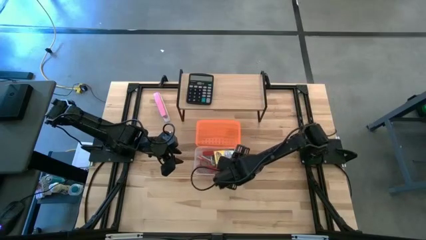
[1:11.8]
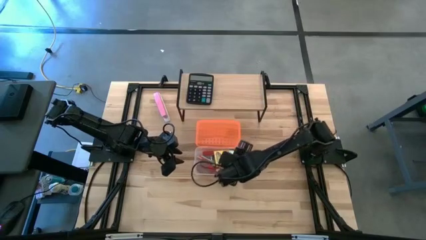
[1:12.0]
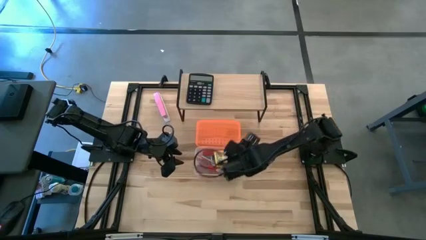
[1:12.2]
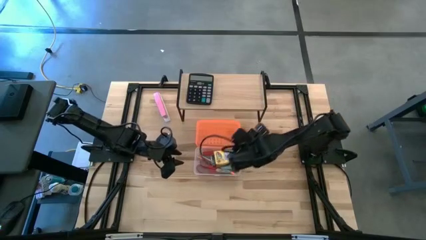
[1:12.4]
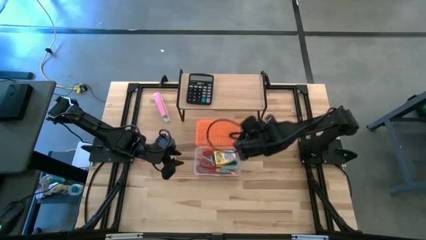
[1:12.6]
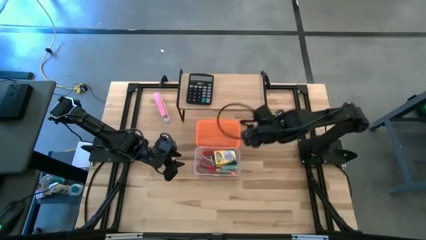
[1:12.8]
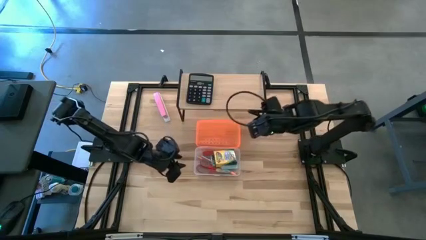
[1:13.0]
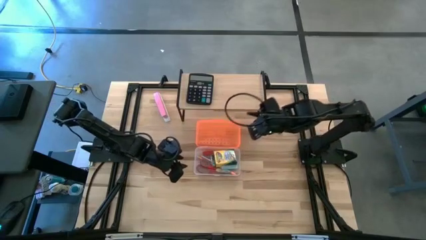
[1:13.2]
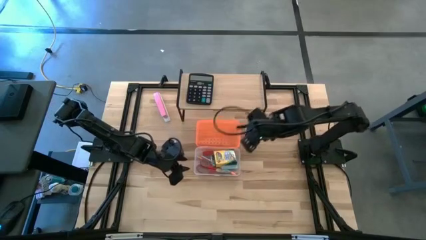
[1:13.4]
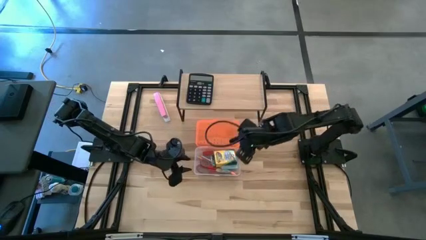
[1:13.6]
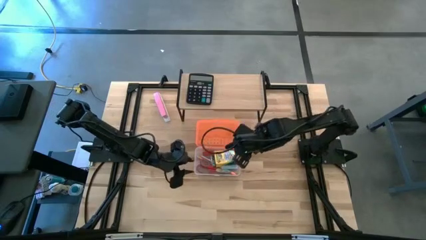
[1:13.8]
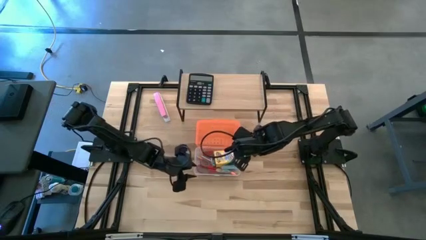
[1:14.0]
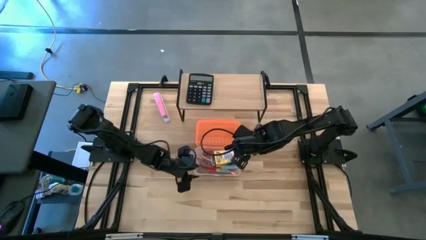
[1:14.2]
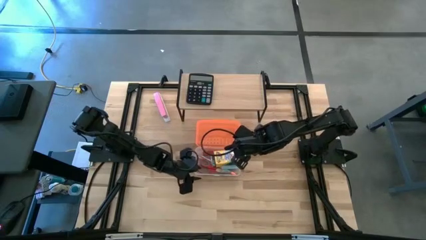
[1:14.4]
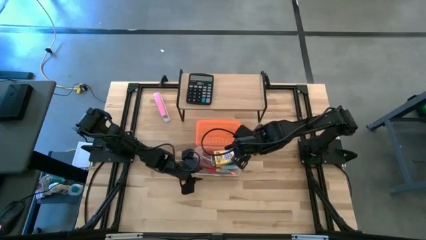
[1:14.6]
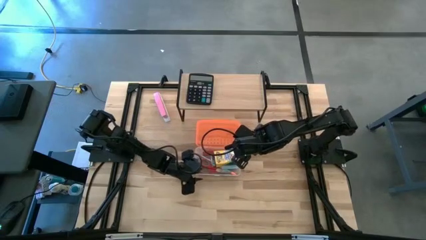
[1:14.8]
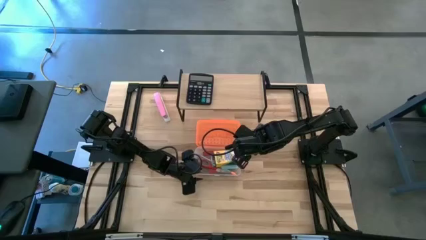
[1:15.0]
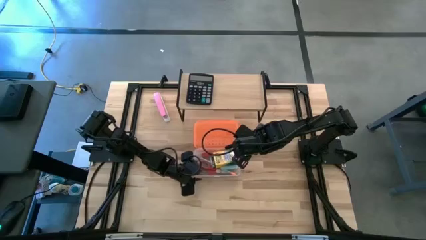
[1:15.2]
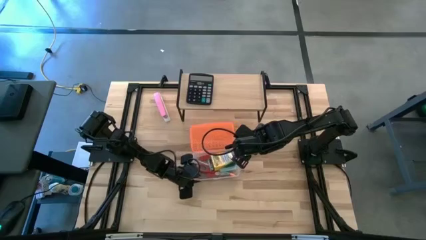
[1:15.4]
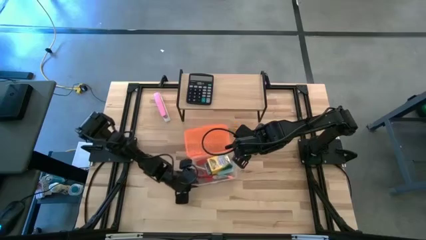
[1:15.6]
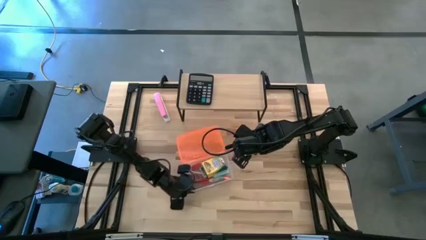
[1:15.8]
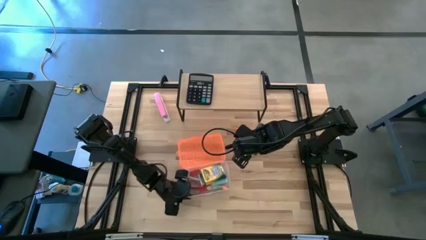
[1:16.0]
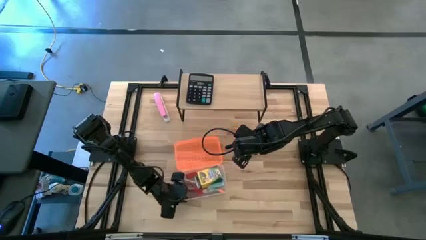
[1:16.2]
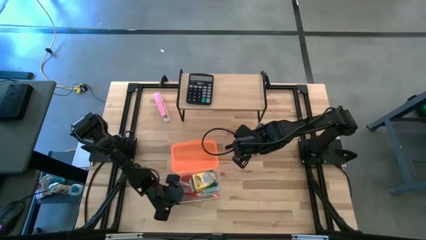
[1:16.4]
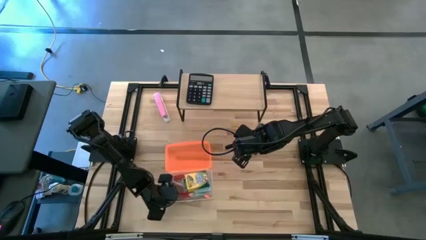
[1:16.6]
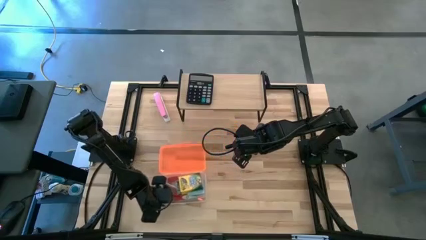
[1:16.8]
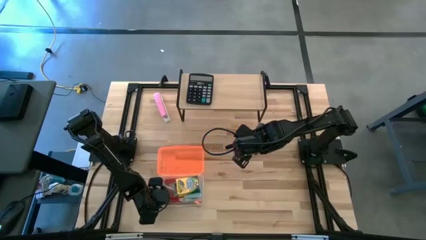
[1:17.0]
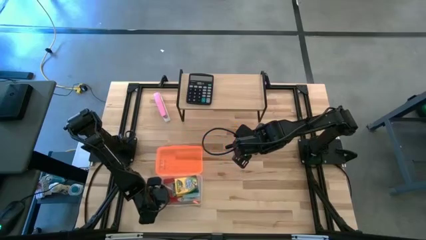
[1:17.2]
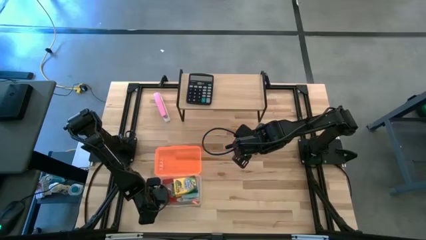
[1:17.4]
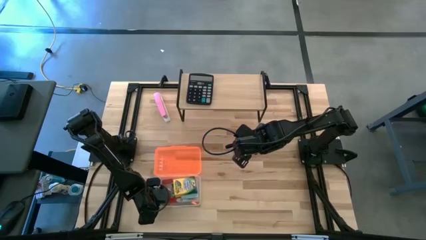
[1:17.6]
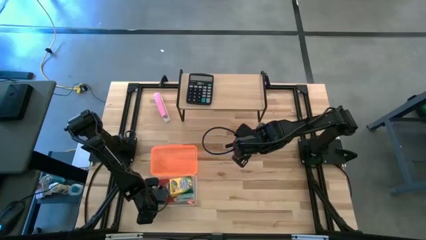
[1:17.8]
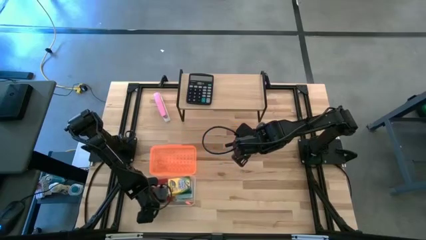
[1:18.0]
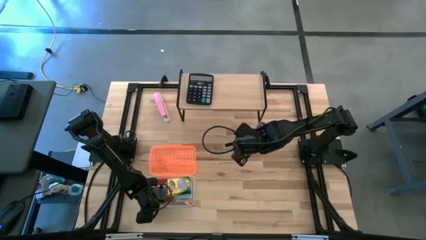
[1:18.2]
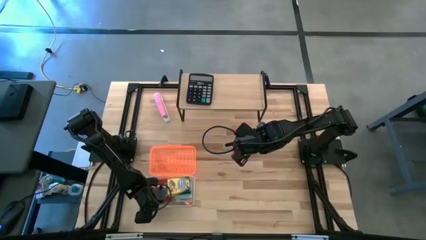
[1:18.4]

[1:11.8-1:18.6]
Task: Pack school essentials
Move the supply box to the bottom left of the table

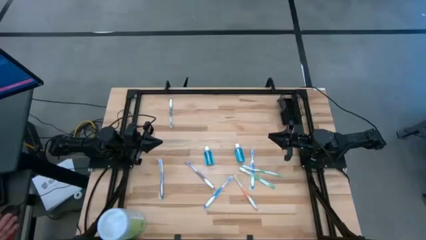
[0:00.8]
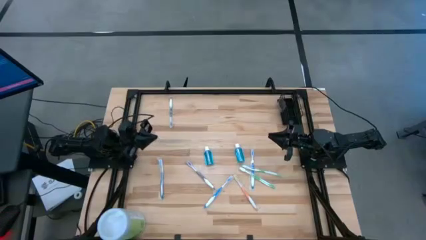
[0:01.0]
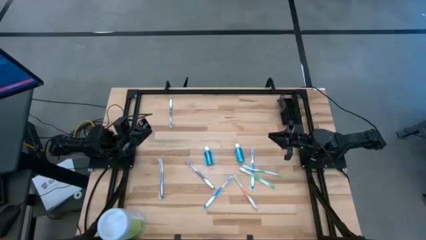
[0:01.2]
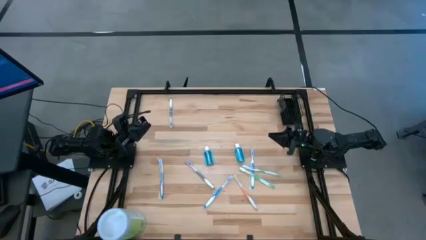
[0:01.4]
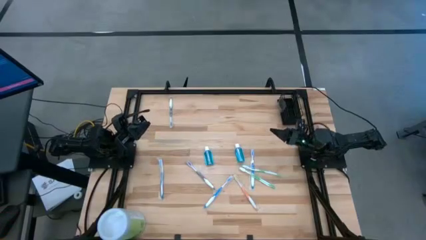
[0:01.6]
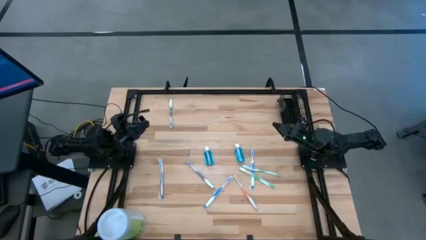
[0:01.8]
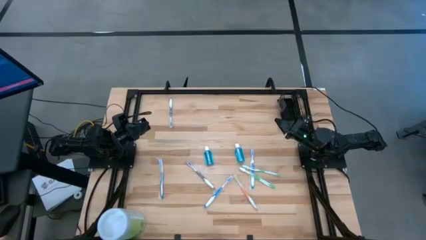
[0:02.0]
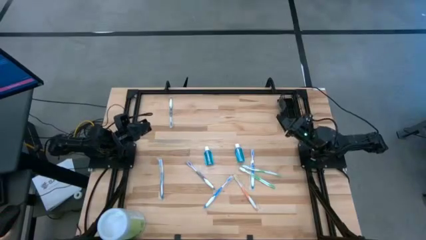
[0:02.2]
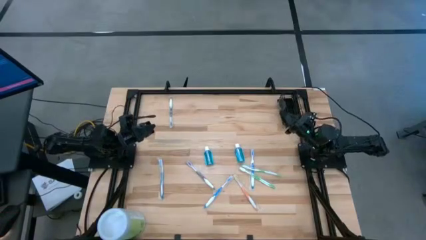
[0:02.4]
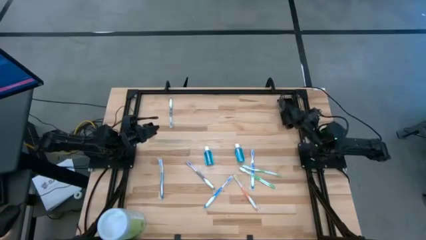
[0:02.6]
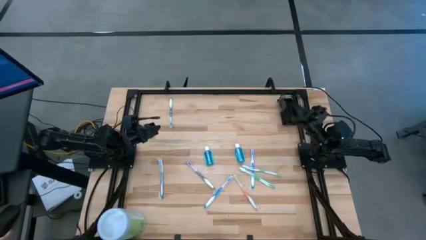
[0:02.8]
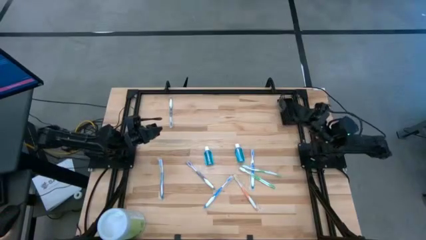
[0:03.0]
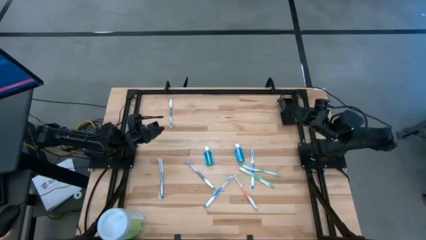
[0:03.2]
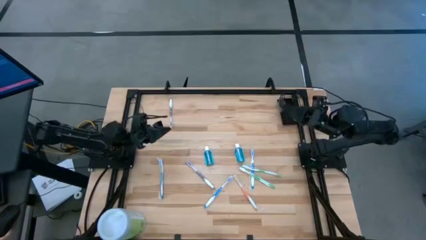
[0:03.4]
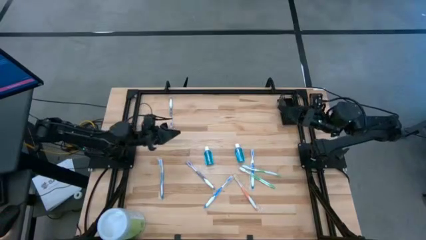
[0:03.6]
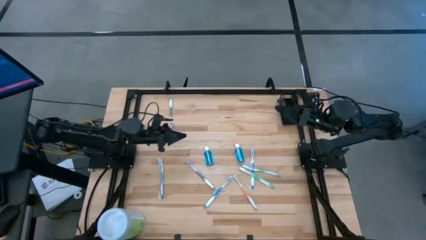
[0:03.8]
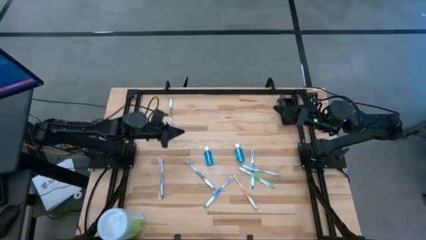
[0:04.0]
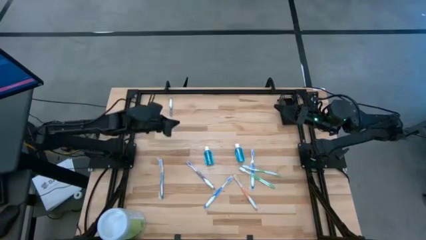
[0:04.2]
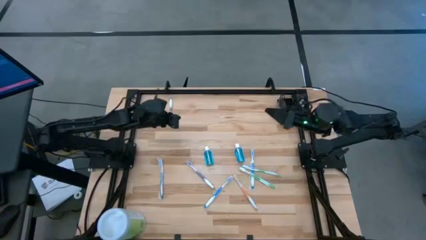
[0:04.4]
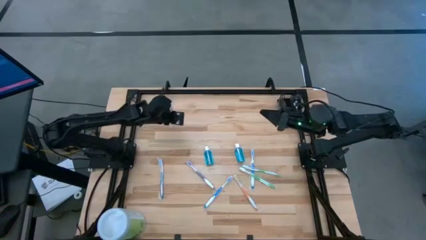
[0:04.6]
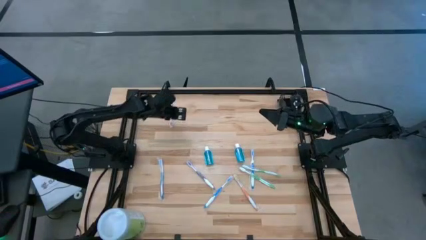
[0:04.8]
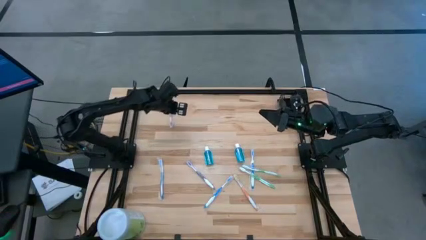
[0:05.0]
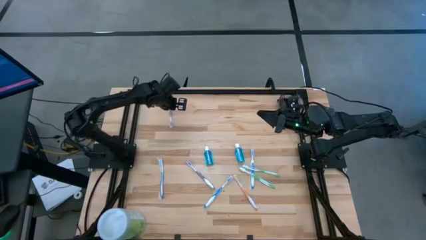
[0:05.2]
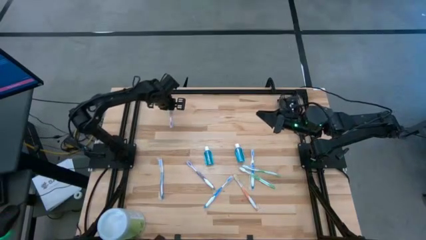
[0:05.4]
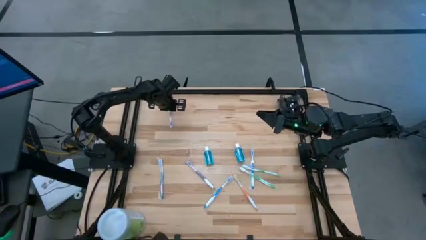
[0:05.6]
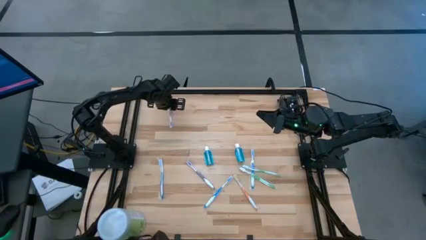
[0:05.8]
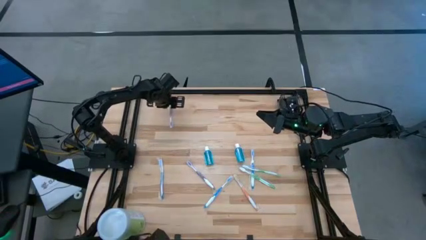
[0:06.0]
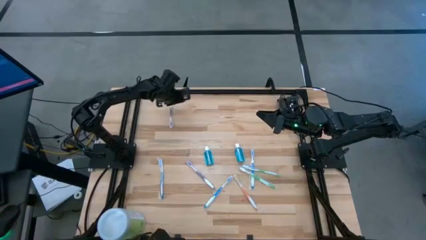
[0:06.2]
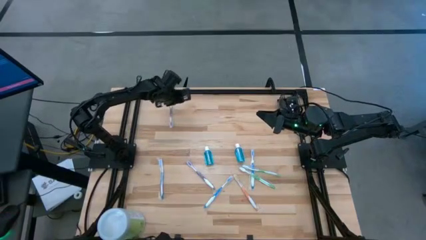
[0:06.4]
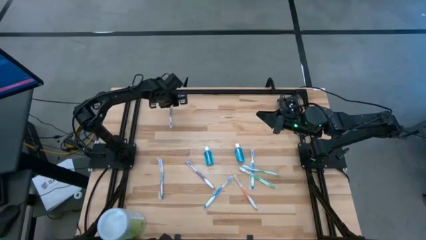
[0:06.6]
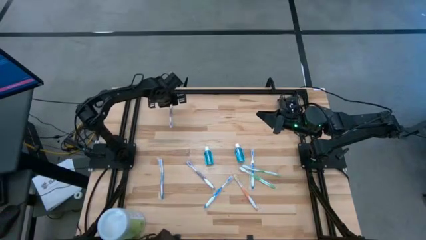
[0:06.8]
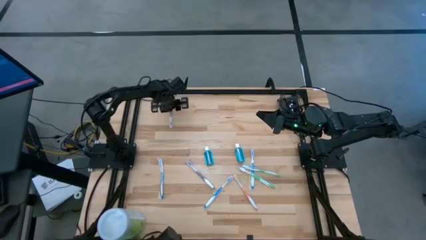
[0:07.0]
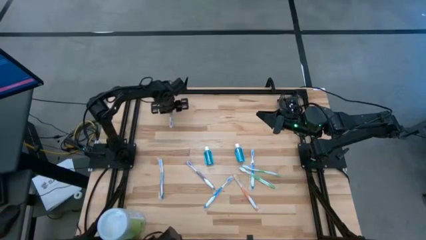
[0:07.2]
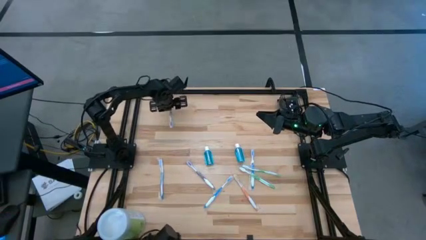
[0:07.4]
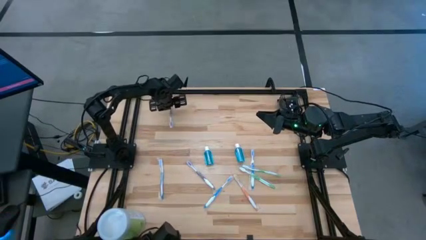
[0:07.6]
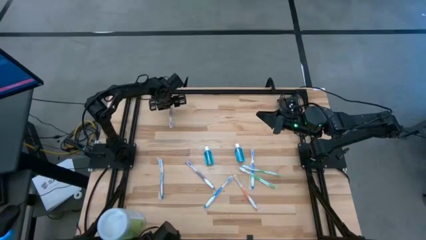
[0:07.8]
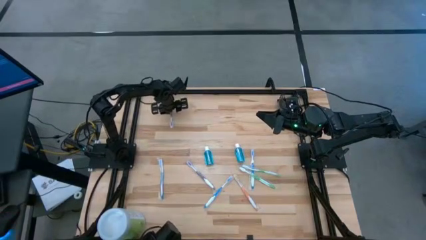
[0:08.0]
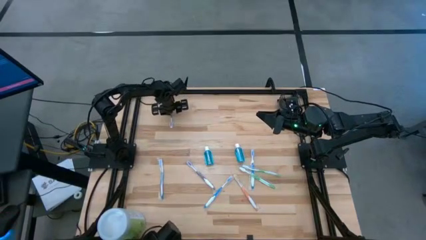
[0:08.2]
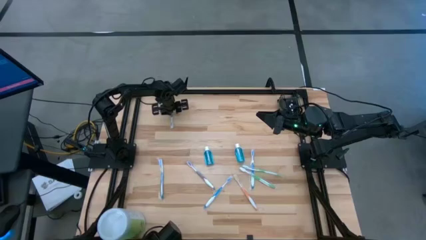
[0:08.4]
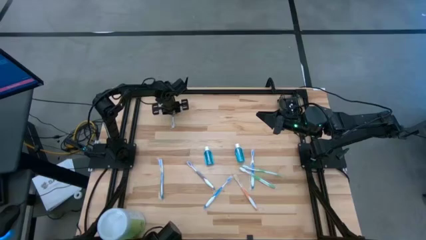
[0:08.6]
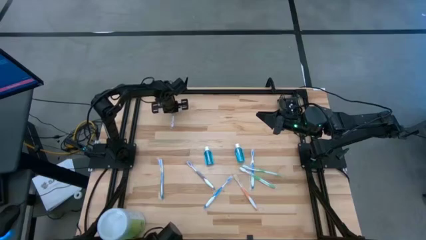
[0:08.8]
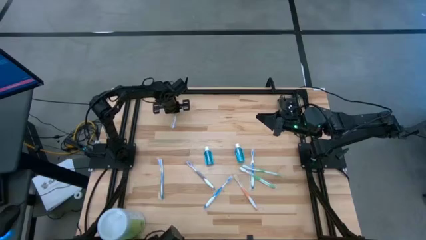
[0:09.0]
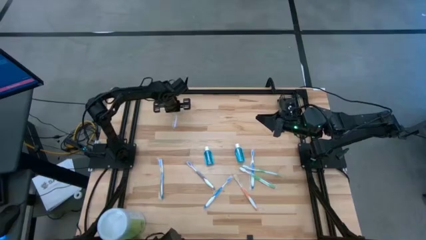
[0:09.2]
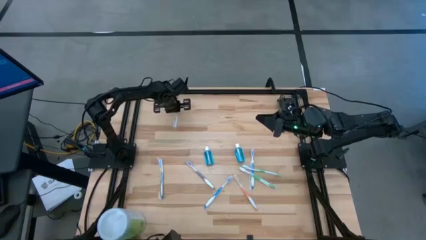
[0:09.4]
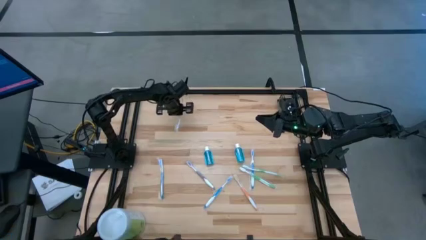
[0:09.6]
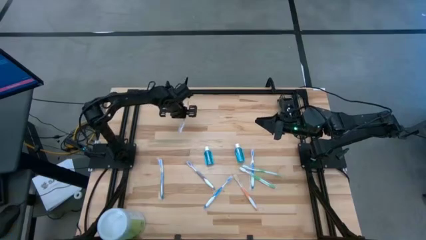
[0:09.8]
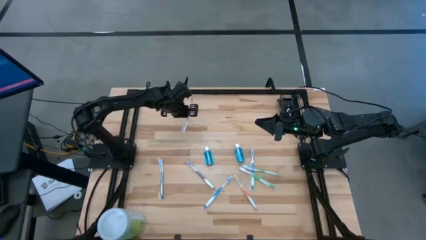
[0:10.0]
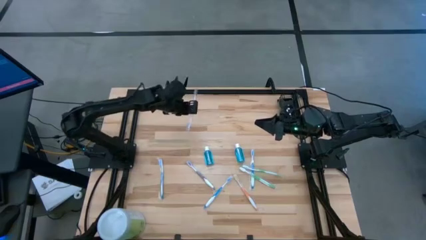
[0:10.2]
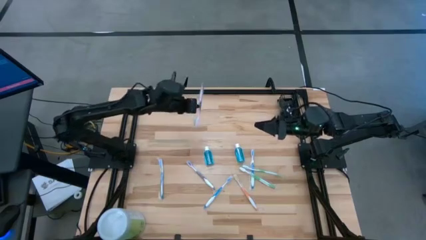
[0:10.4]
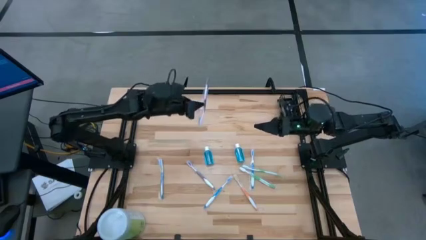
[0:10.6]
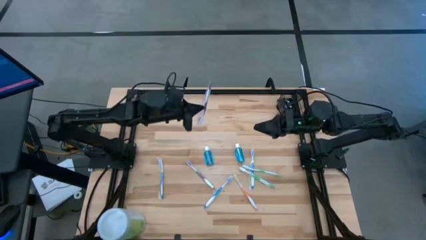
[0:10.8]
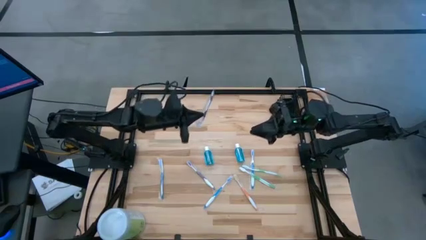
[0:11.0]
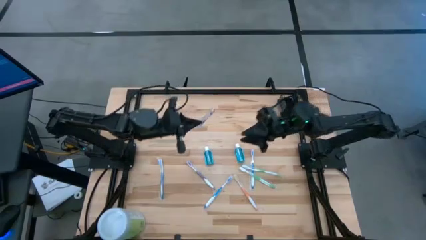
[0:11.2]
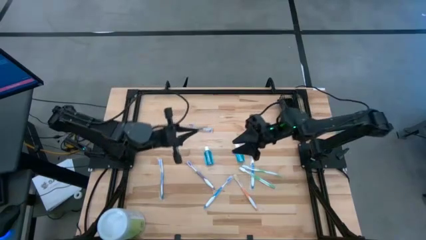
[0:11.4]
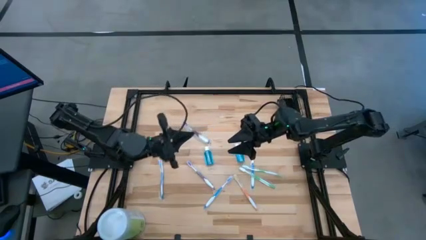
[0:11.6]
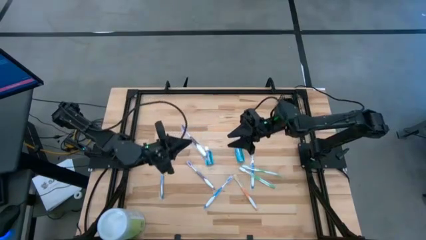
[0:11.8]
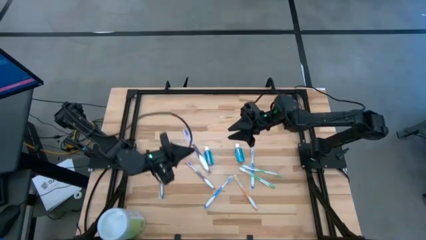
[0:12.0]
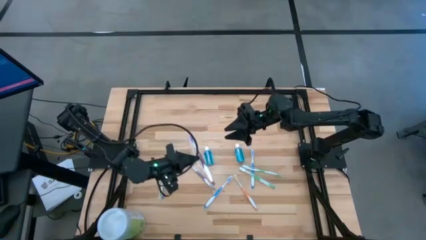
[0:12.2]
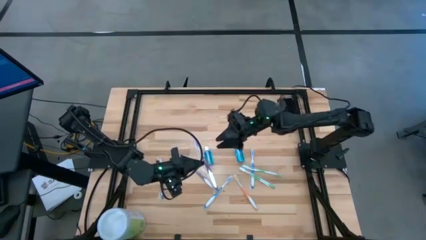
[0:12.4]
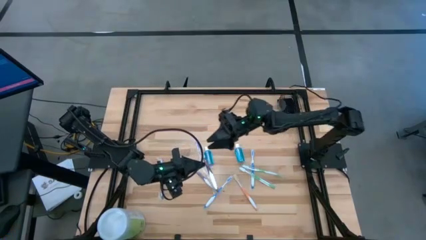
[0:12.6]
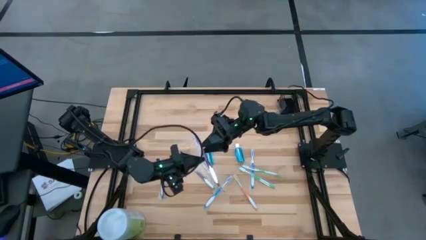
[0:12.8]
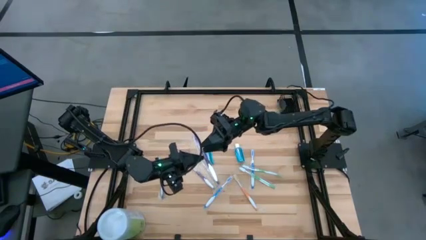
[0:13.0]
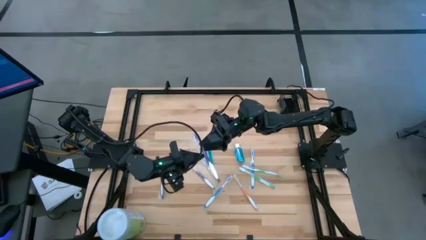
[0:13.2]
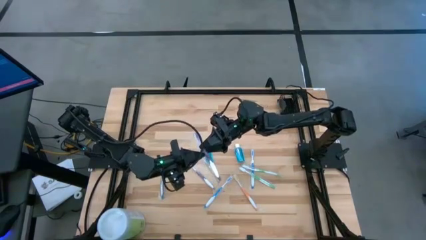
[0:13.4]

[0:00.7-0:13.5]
Task: Pick & Place toothbrushing station
Put the top purple toothbrush into the left section of wire organizer
